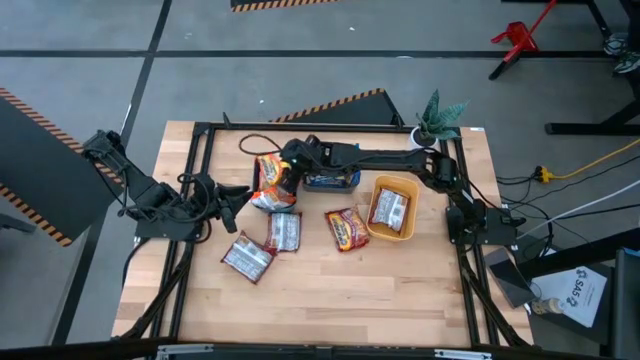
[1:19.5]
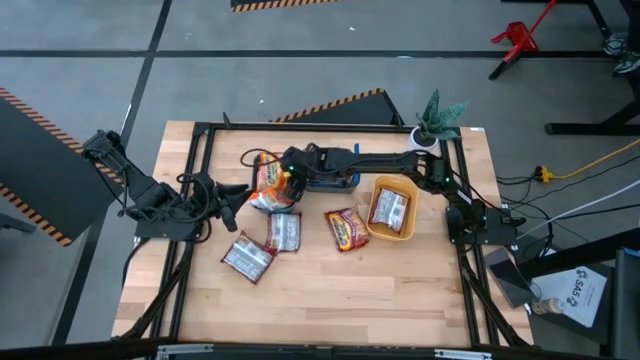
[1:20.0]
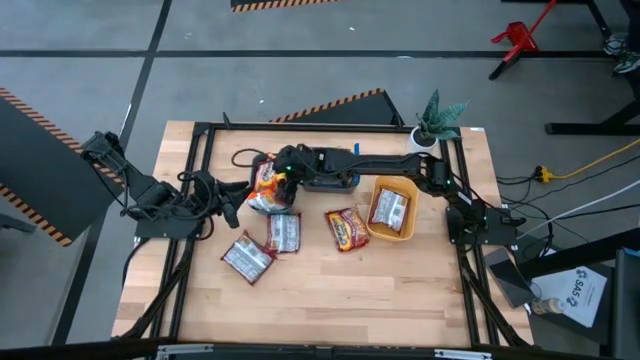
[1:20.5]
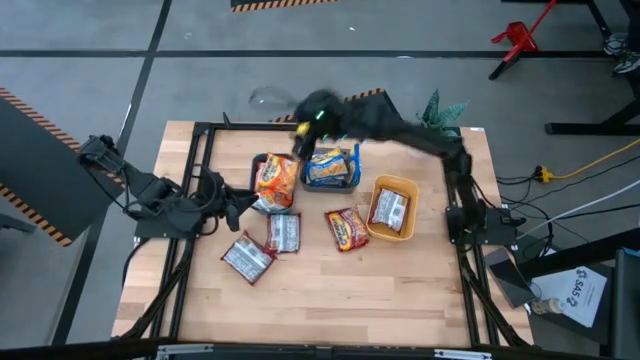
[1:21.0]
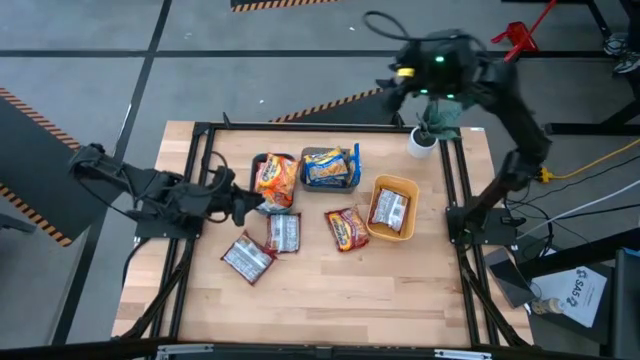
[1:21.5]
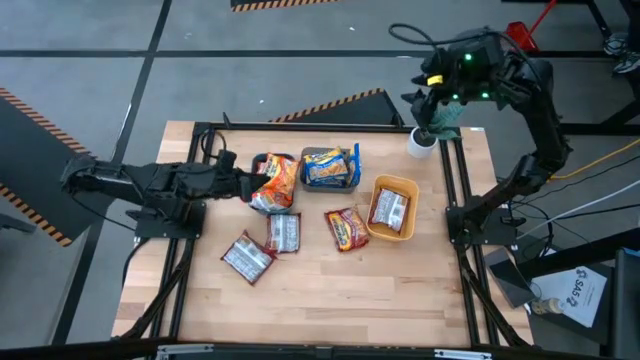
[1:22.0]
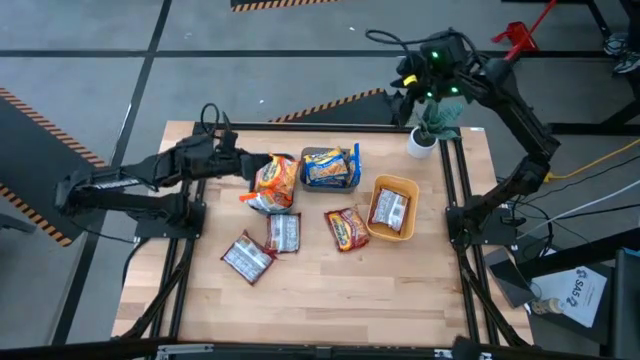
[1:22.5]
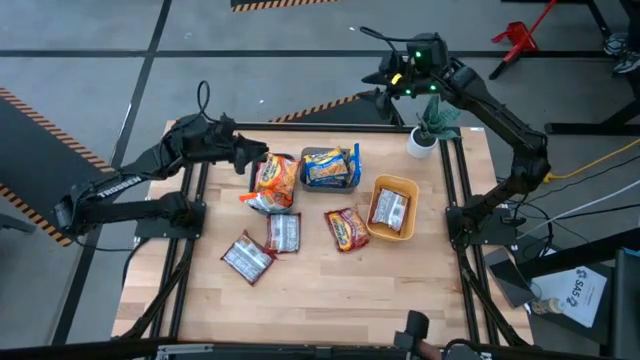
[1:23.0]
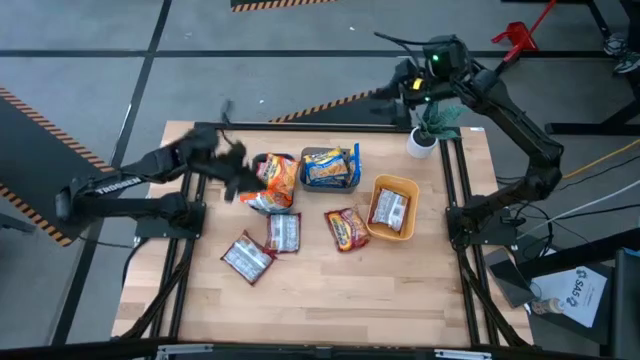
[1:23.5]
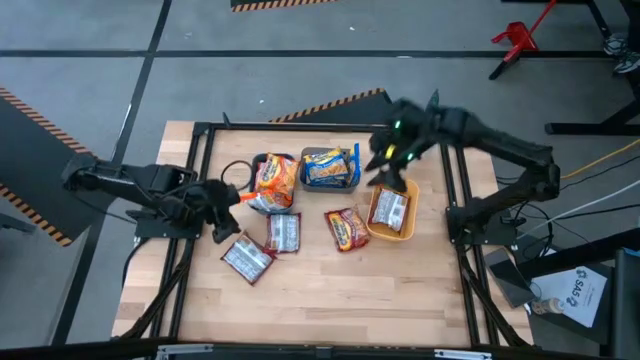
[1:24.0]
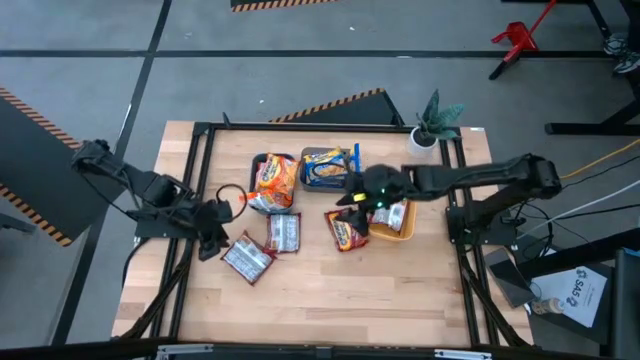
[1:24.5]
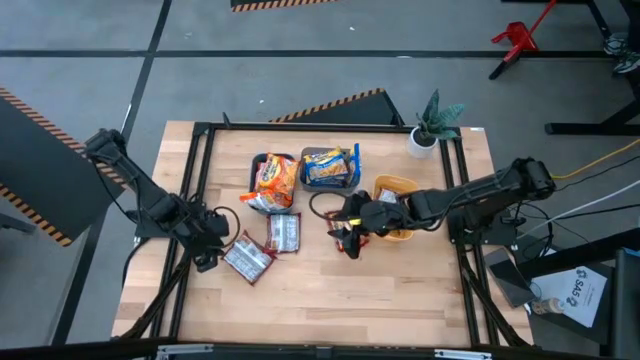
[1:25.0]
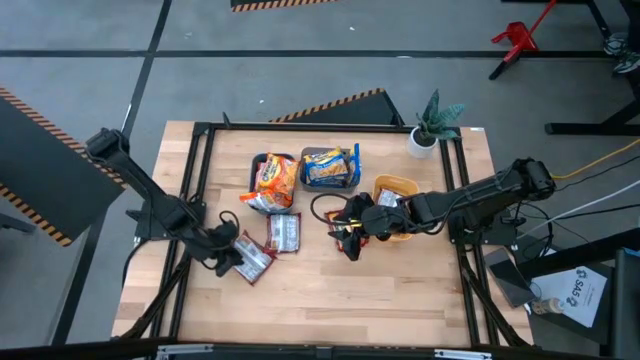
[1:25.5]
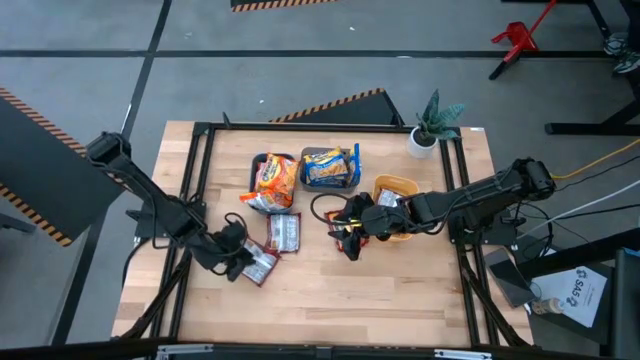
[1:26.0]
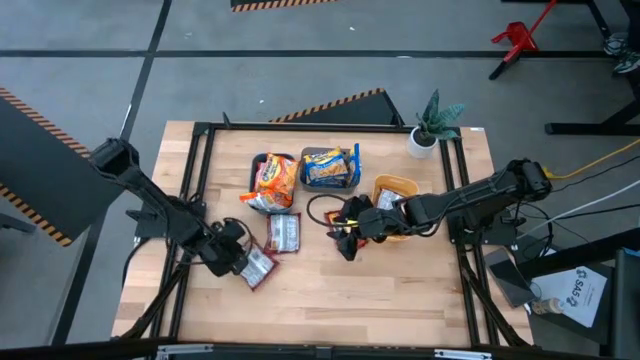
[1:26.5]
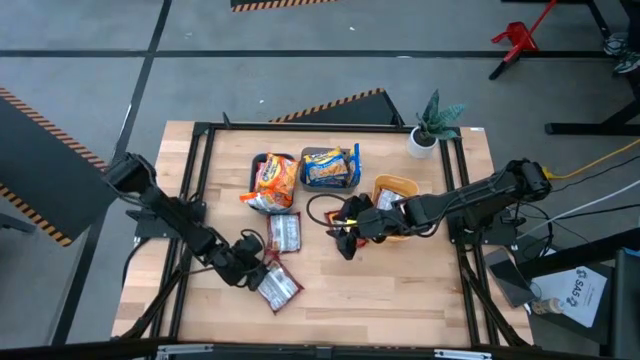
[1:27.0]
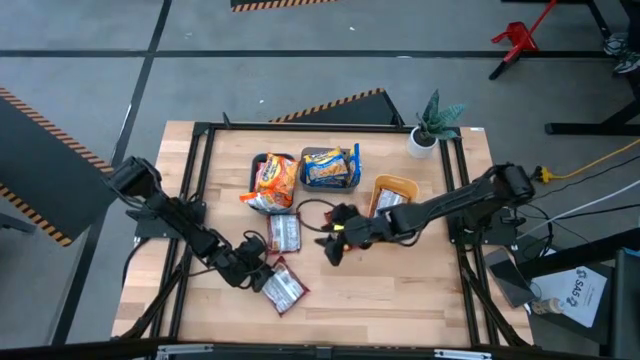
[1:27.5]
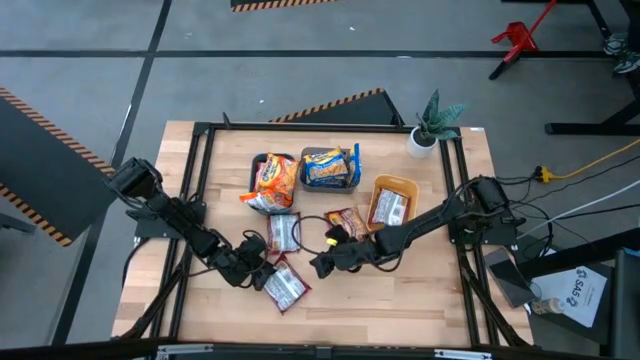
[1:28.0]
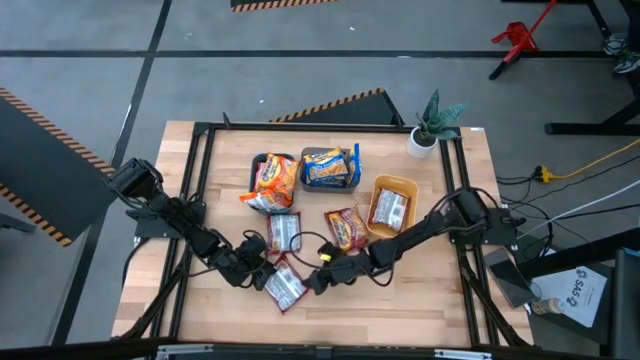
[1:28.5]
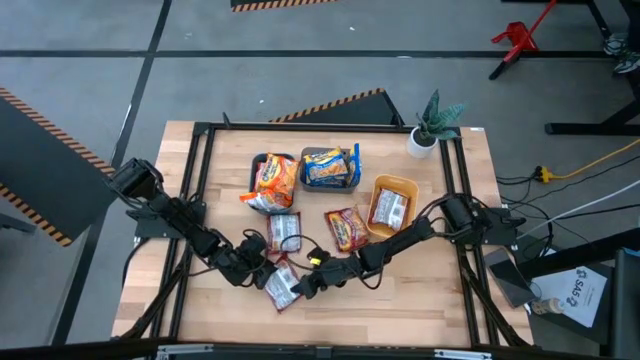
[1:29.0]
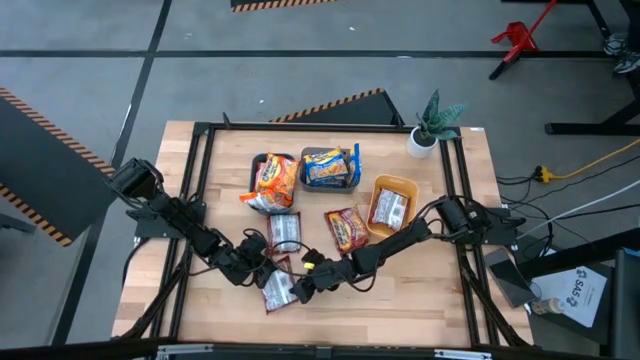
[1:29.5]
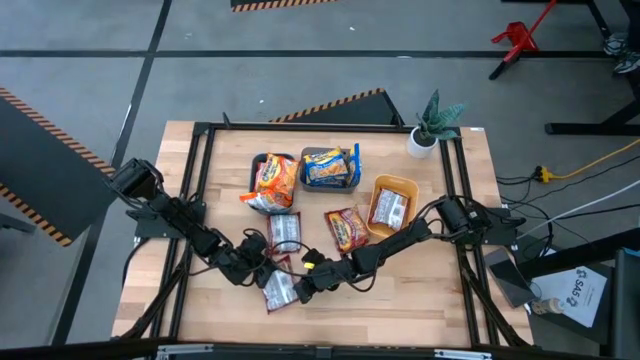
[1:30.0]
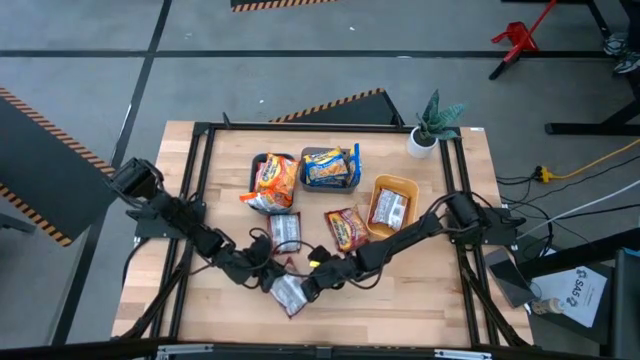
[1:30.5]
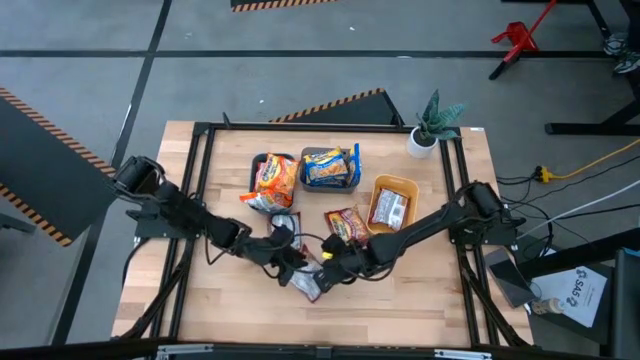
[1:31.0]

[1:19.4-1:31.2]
Task: Sort Maruchan noodles
Put the red noodle pack into the yellow bin

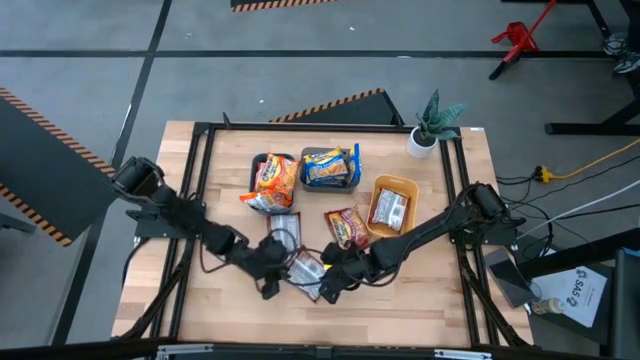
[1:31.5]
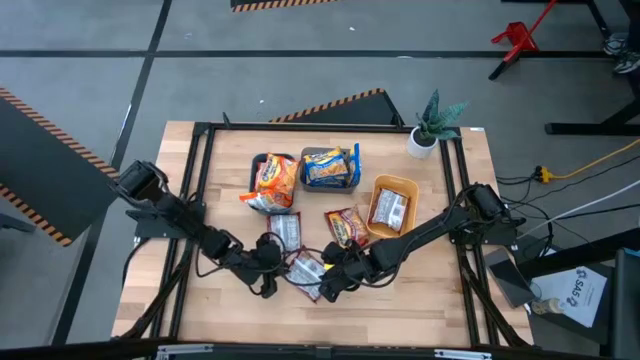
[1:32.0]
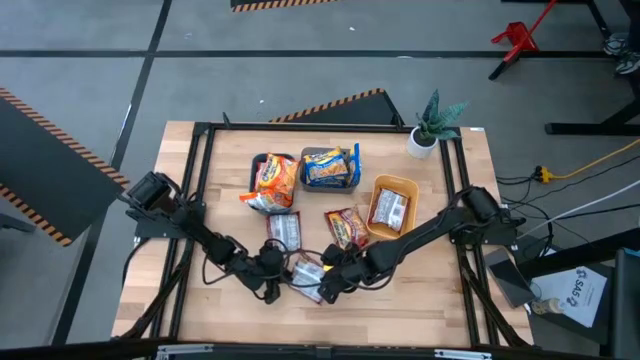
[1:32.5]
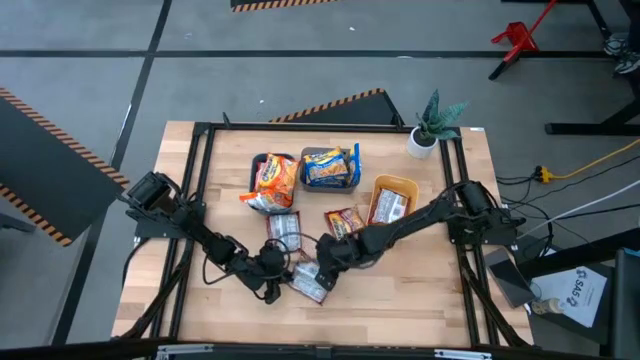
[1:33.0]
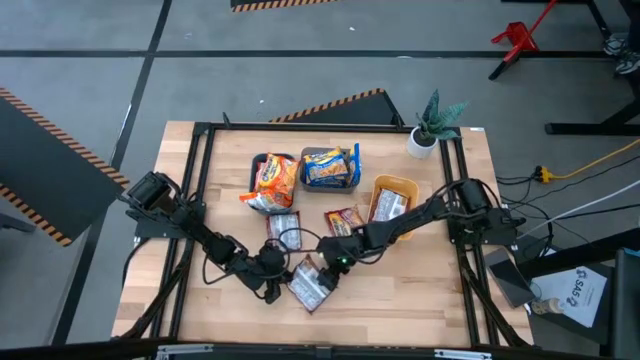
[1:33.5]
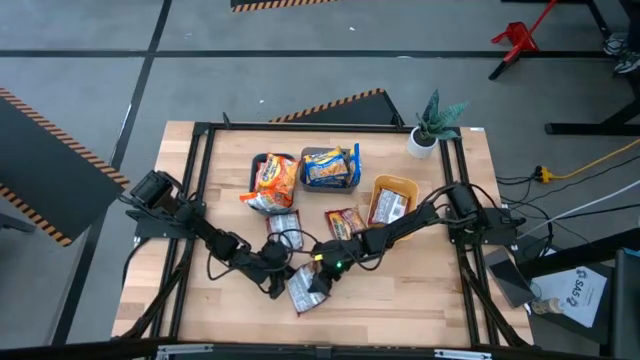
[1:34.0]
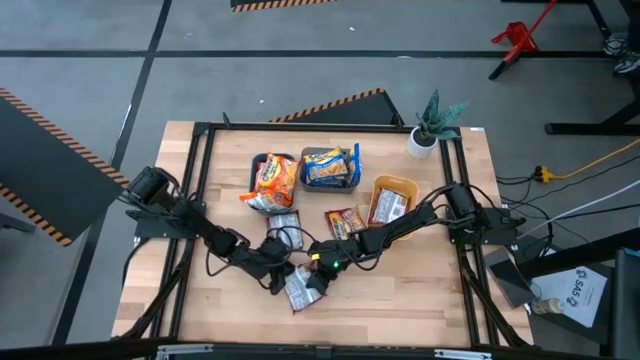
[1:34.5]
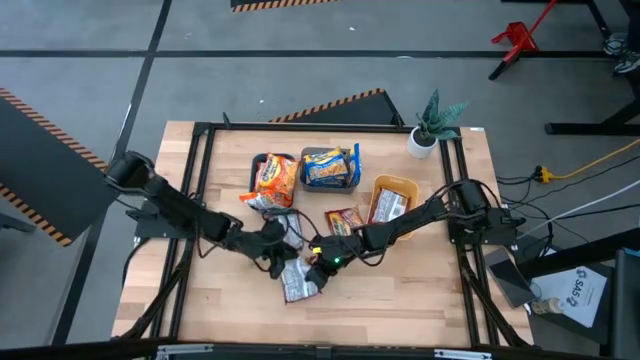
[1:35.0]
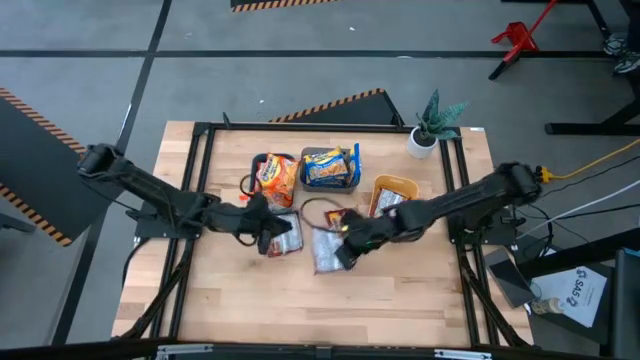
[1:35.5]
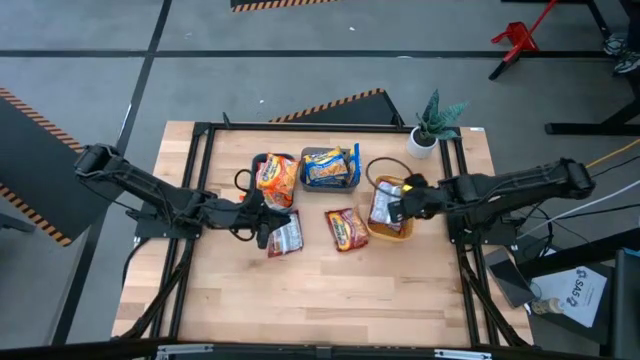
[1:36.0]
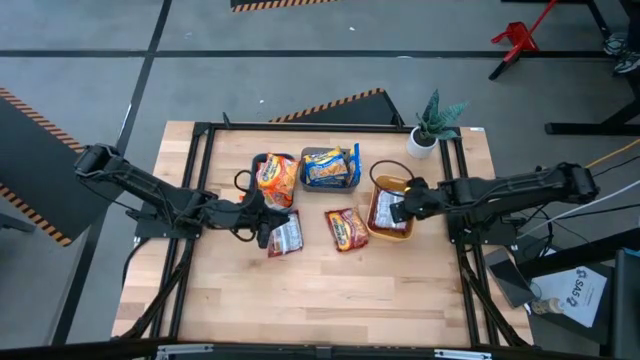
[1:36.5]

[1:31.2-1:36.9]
Put the red noodle pack into the yellow bin

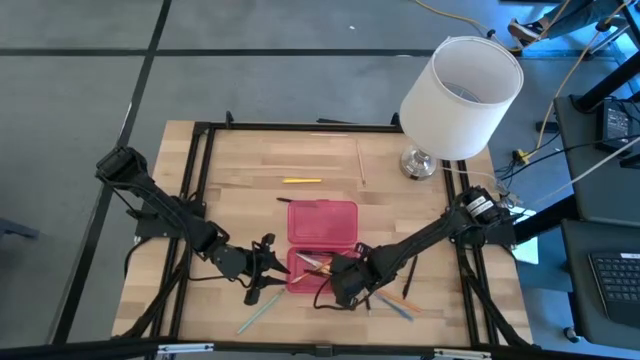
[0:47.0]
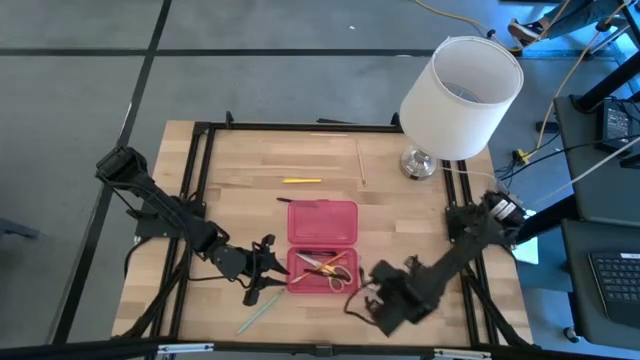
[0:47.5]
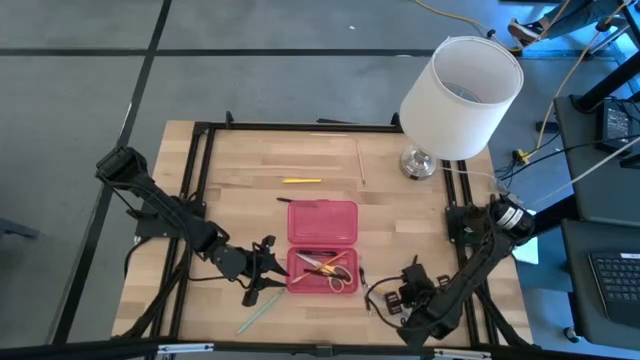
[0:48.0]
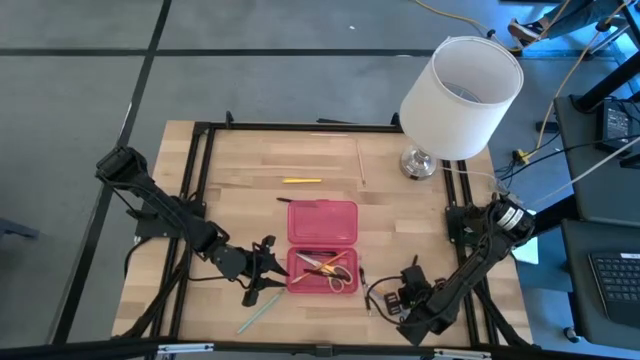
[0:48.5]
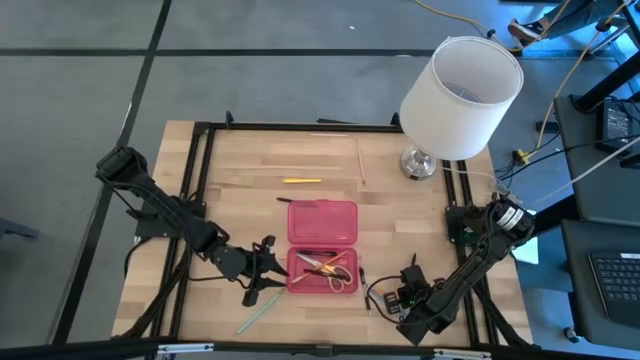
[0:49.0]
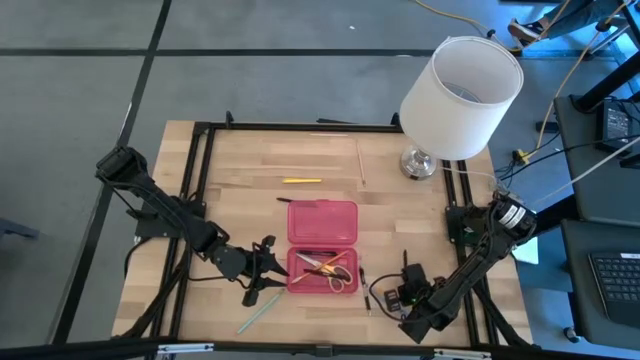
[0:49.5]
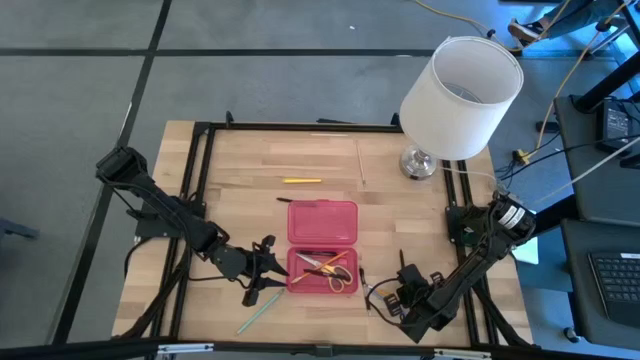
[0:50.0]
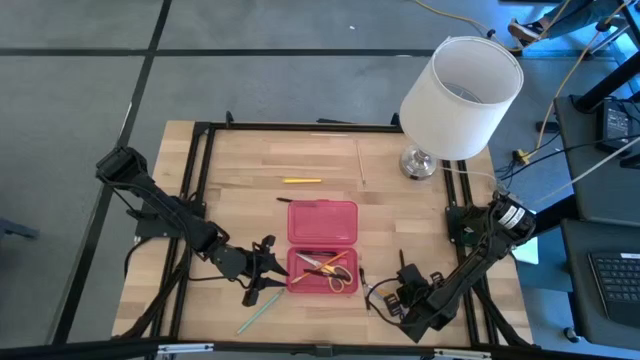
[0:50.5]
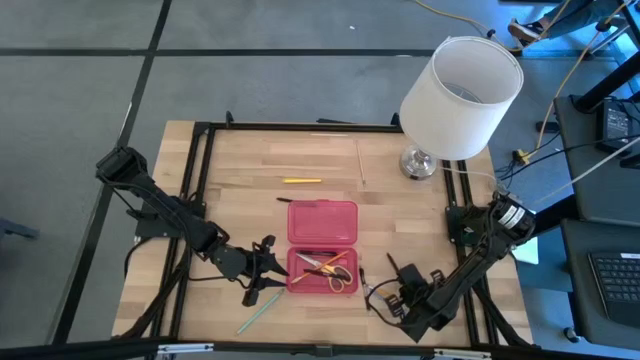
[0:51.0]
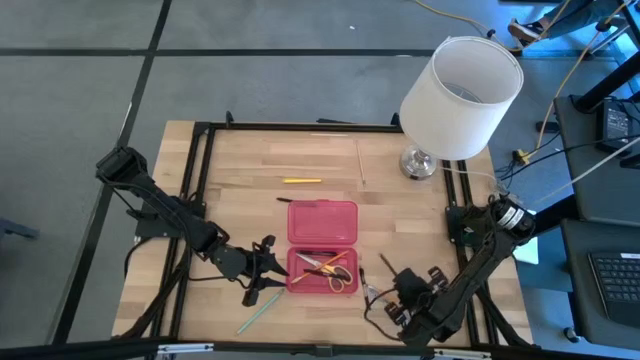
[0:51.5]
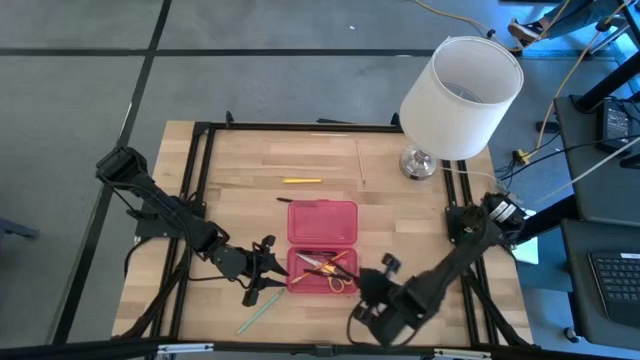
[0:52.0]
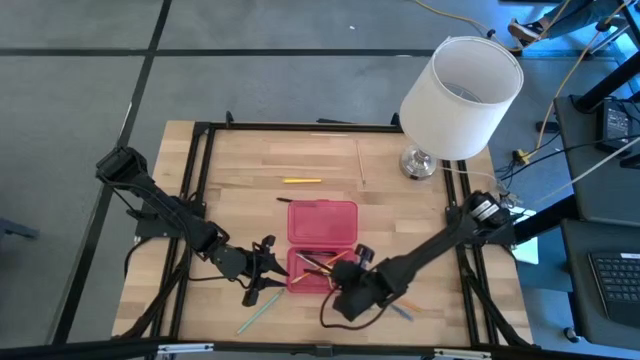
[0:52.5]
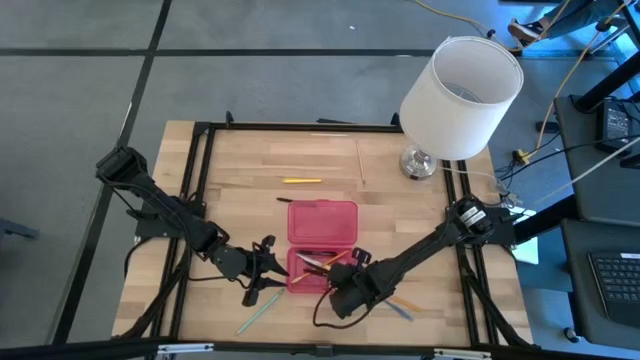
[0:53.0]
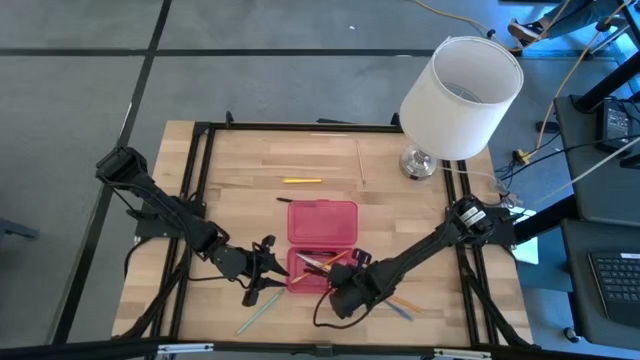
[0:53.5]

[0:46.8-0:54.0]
Task: Pick & place school supplies into a supply box
Put the black pen into the red supply box
